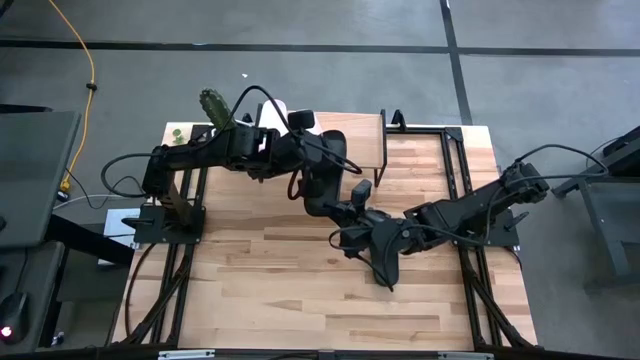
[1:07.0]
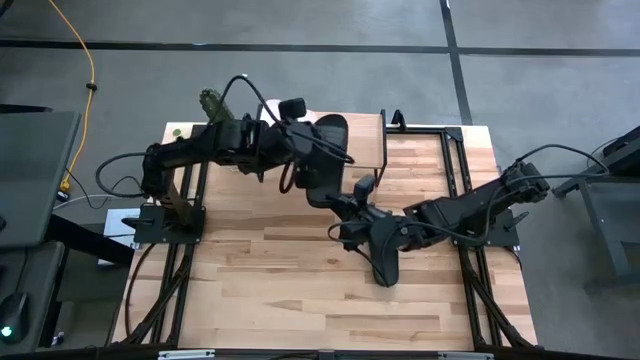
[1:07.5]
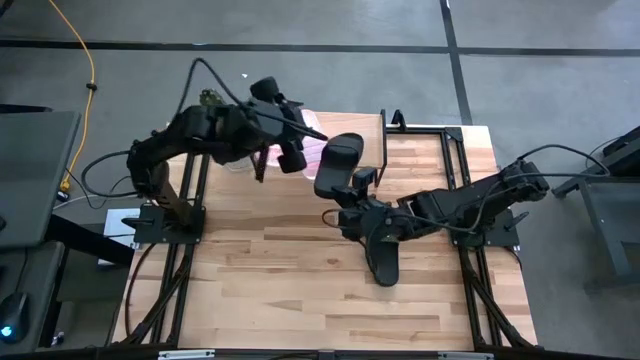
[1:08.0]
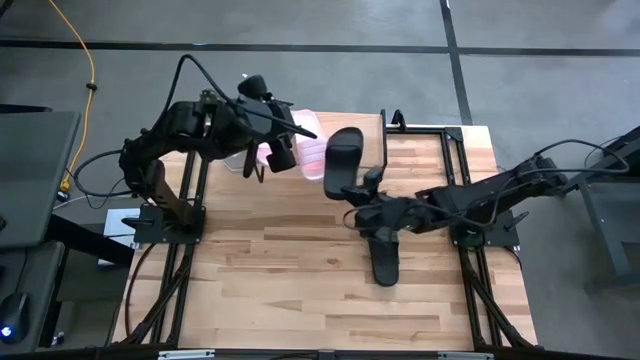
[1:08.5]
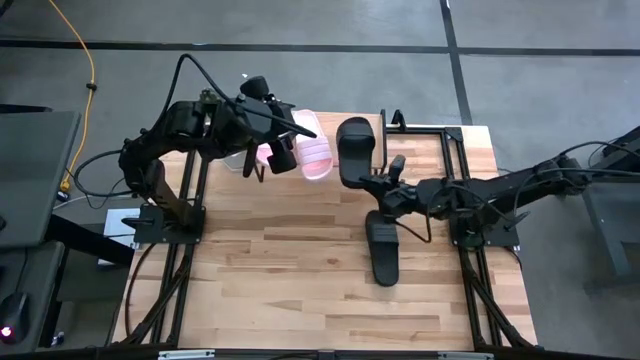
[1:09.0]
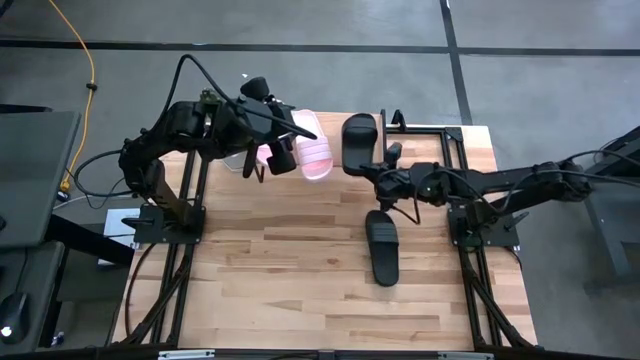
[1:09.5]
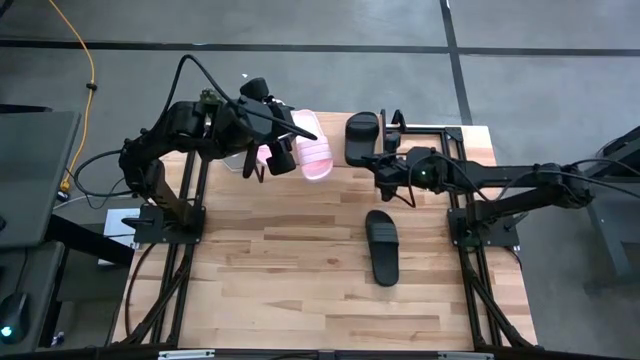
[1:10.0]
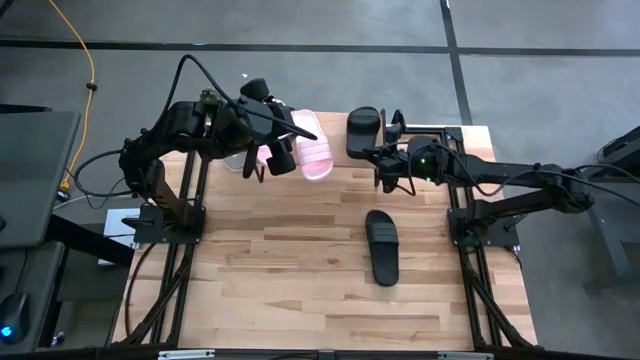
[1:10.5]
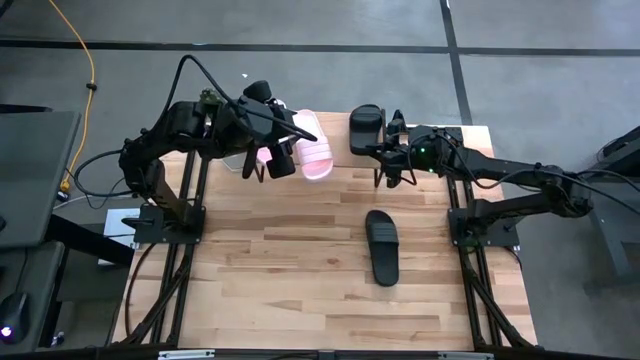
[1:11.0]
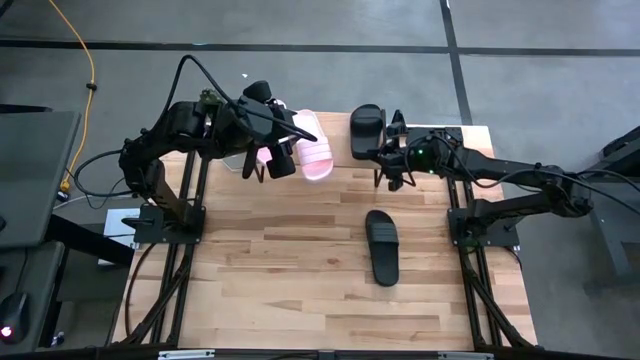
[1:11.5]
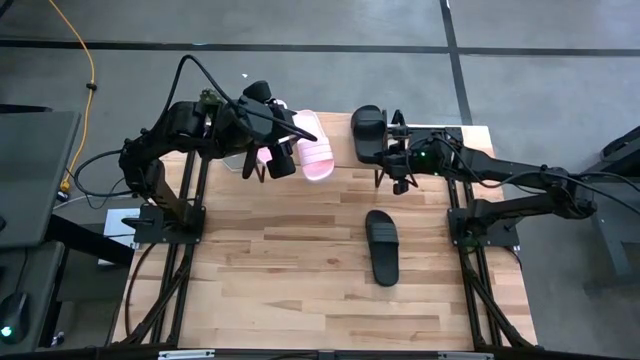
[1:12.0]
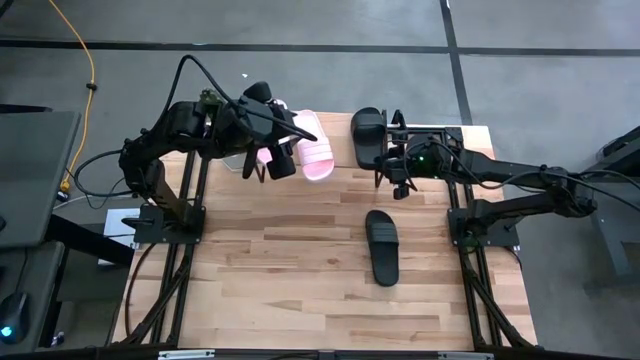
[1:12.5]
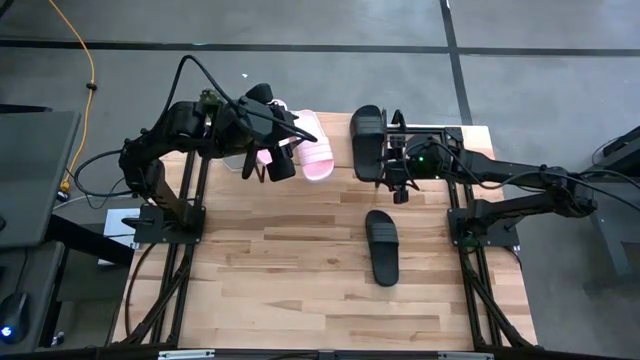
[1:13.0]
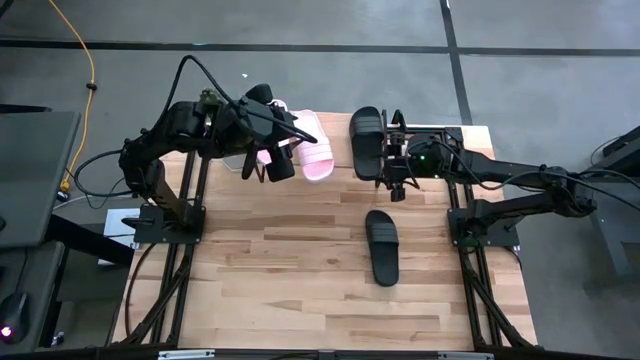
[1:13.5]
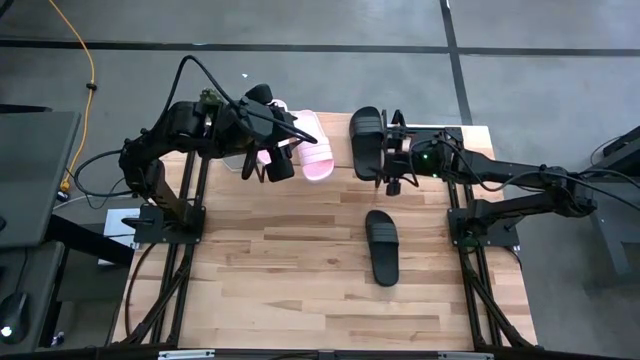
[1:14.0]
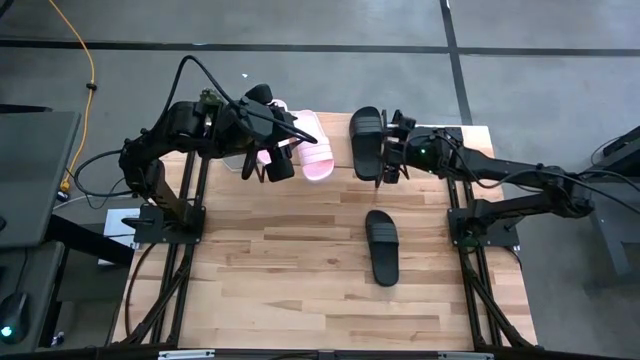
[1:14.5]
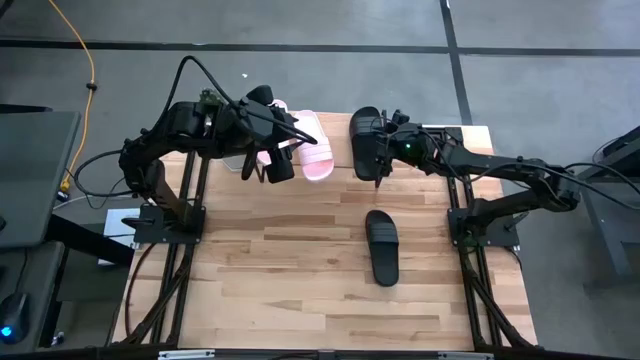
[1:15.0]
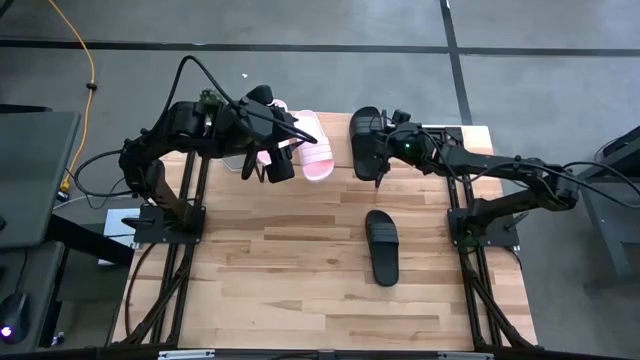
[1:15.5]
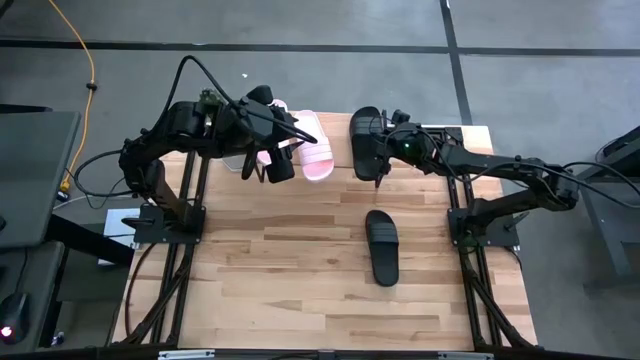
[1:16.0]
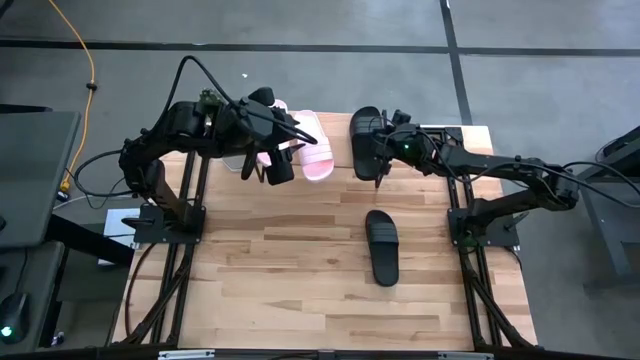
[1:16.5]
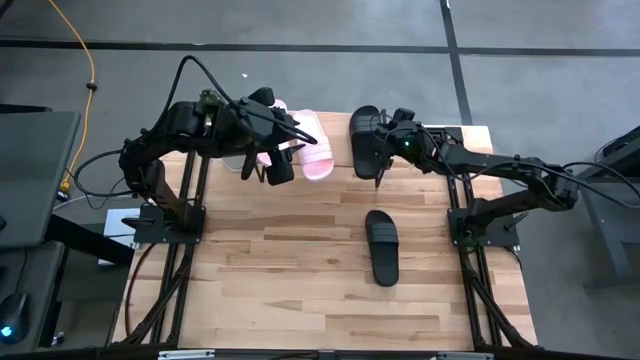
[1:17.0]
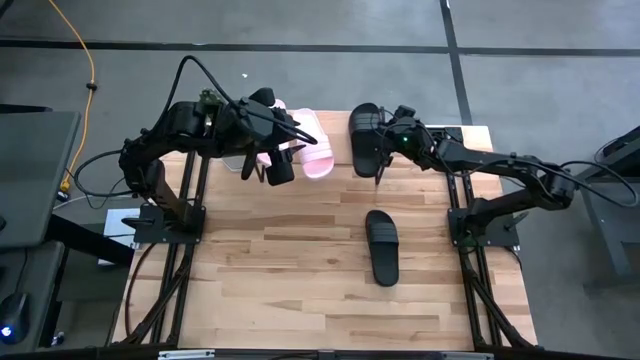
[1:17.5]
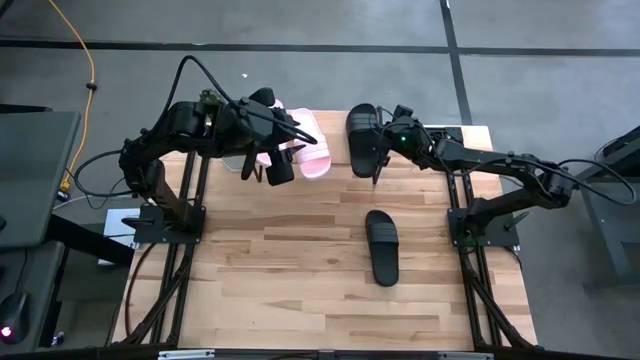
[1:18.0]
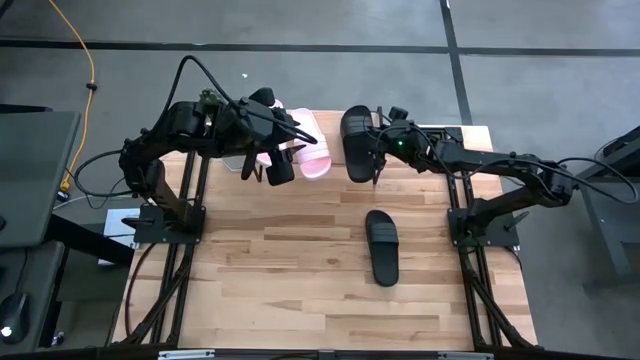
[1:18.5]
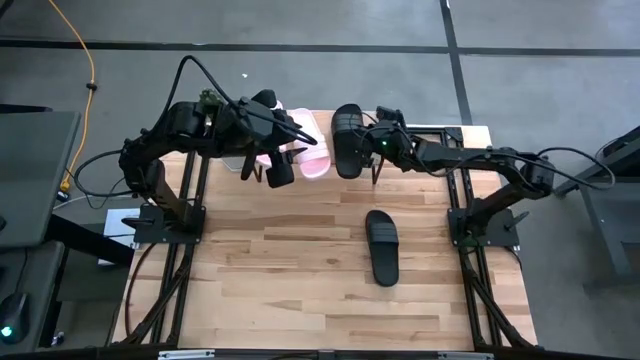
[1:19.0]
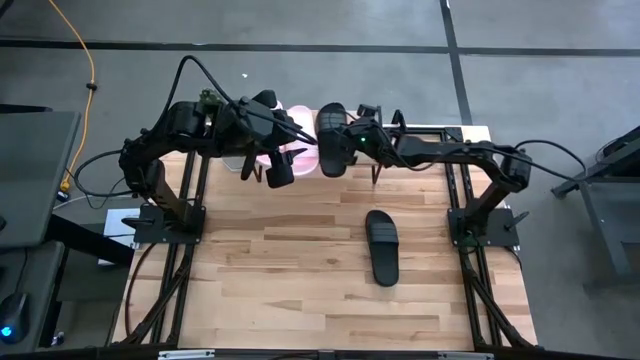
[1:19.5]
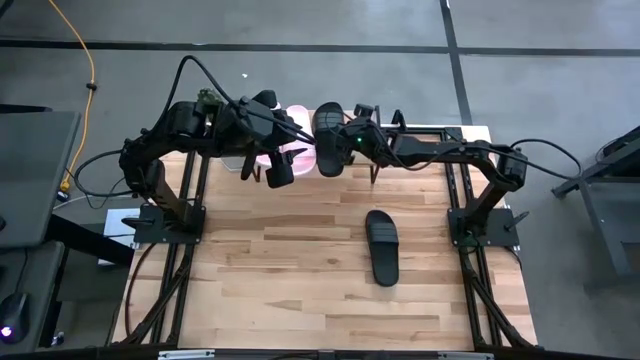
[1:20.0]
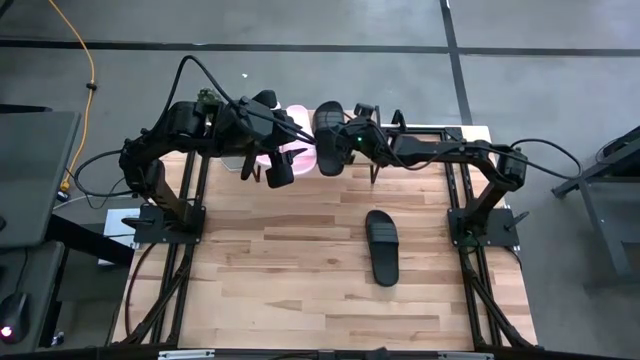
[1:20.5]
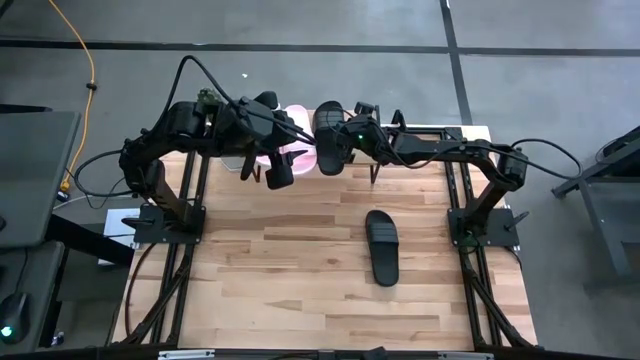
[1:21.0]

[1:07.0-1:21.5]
Task: Pick and place slides into the shelf
Put the left black slipper on the shelf

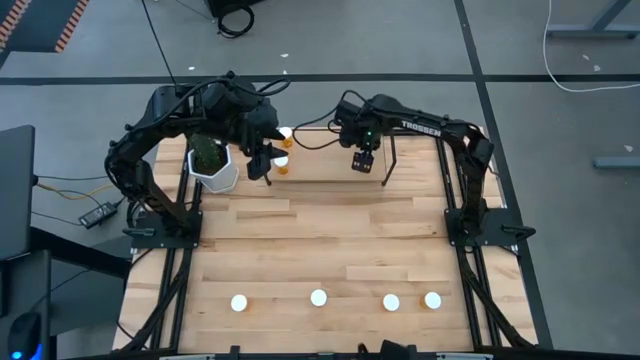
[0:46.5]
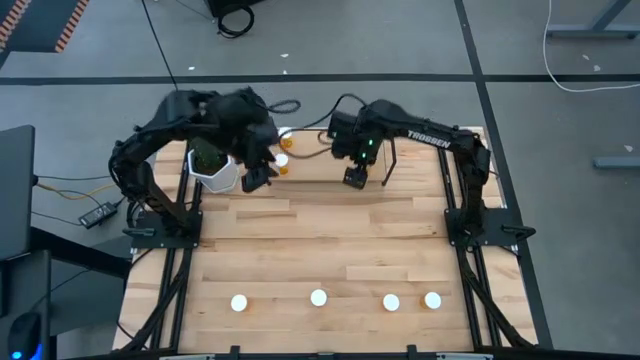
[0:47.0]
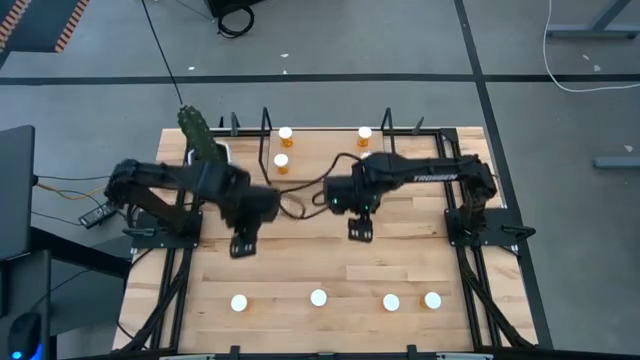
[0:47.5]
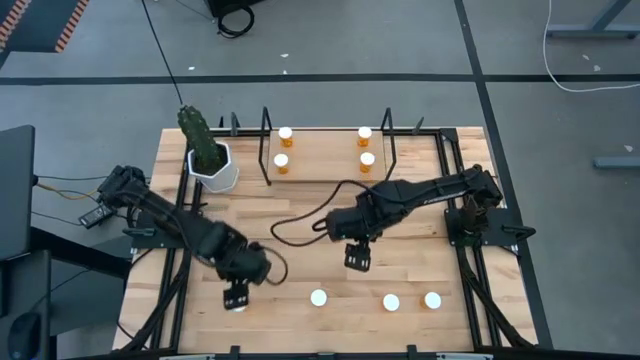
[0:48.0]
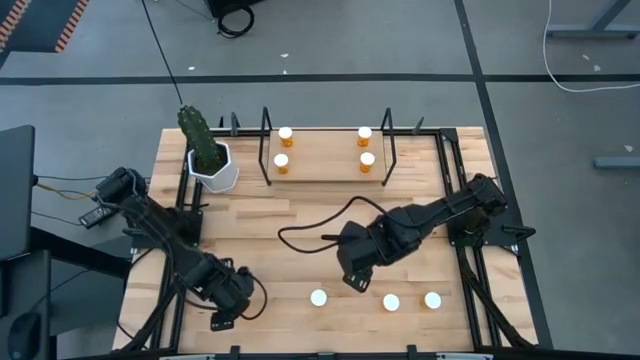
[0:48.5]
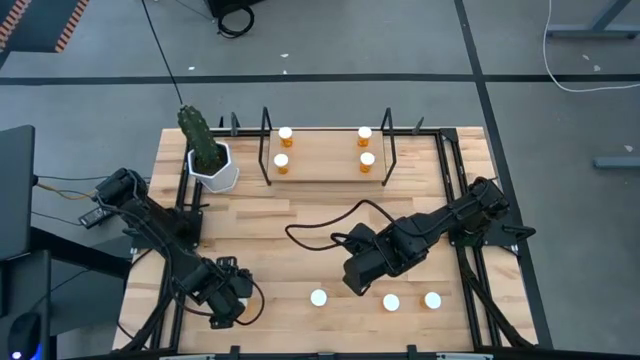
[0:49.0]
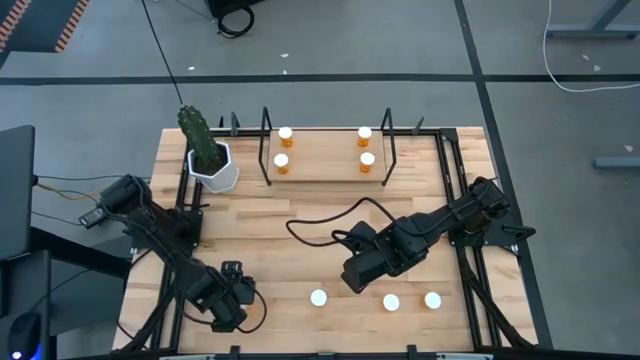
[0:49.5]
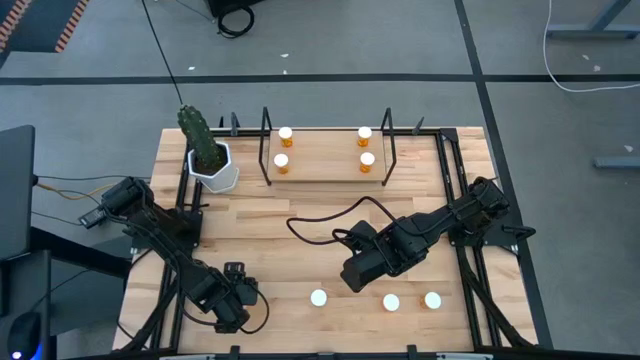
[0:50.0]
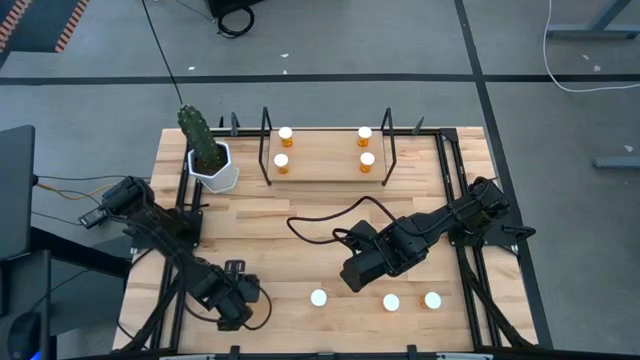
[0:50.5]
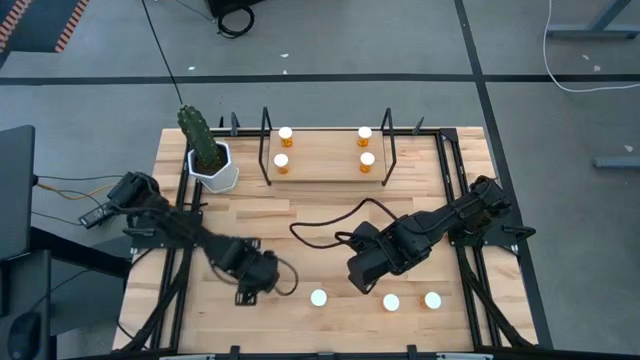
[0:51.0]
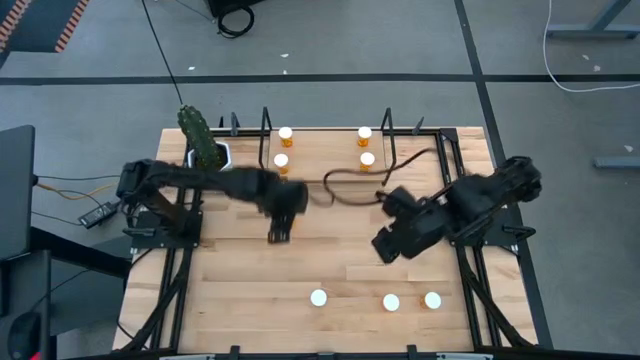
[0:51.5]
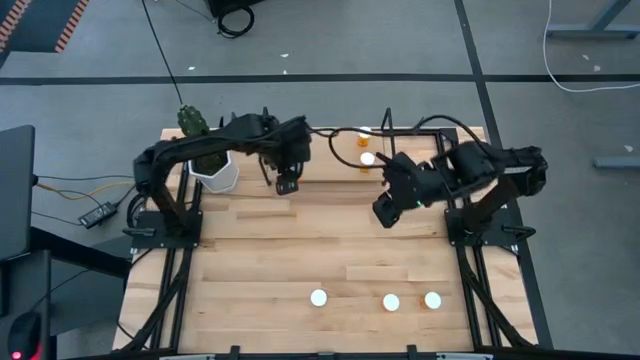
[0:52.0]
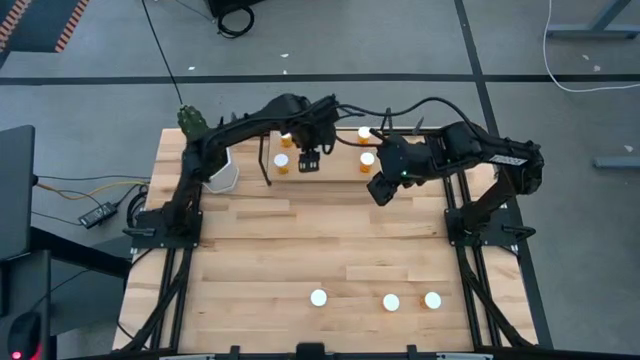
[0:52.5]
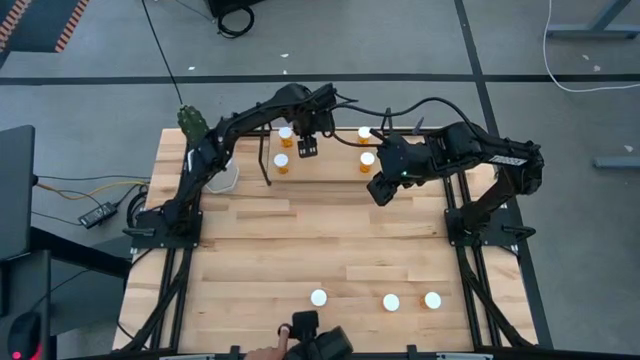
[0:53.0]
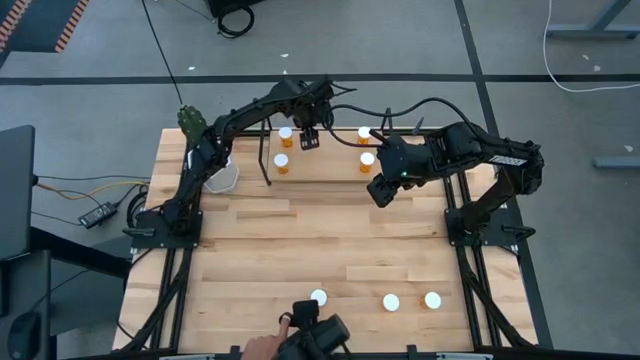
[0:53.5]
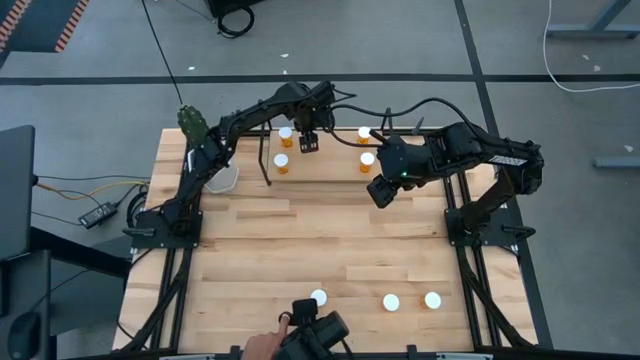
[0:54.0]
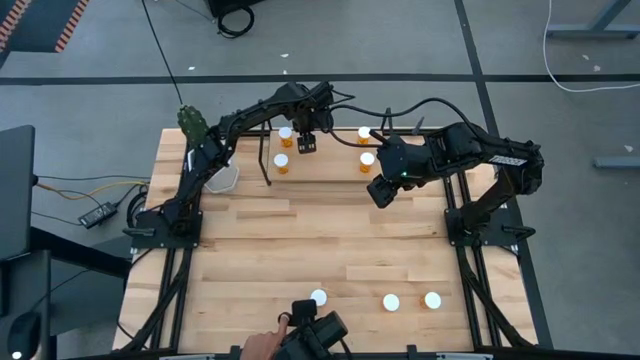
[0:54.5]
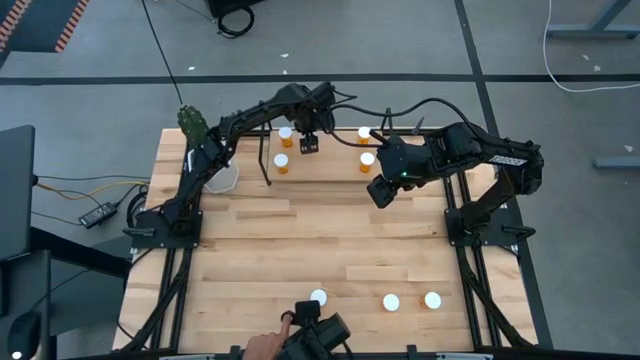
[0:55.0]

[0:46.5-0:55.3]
Task: Pick and place medicine bottles onto shelf by color
Put the orange pill bottle on the shelf
